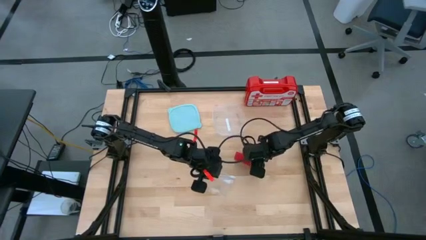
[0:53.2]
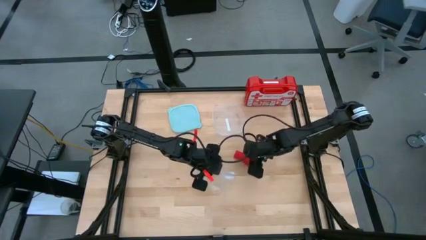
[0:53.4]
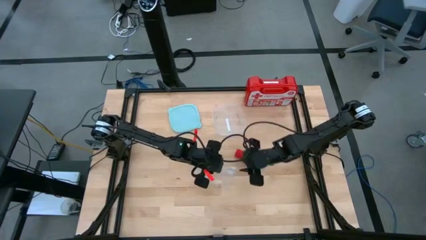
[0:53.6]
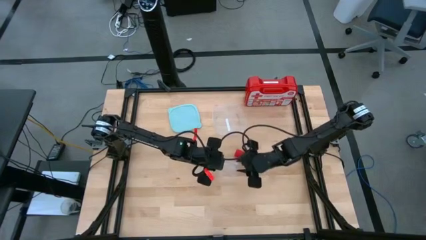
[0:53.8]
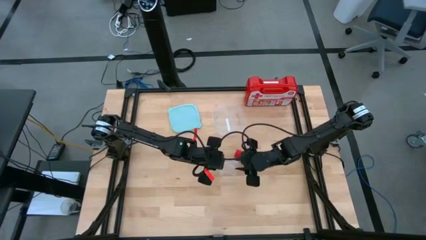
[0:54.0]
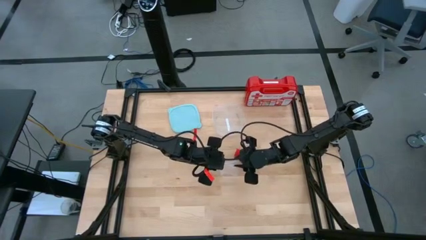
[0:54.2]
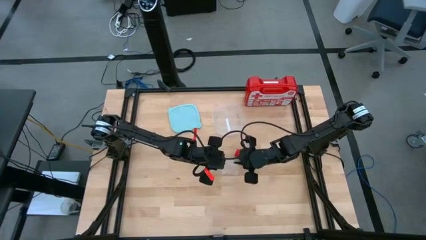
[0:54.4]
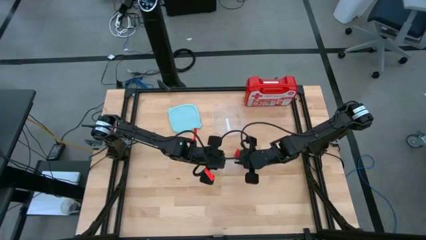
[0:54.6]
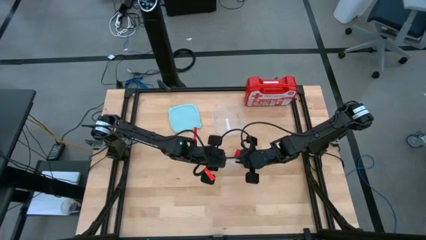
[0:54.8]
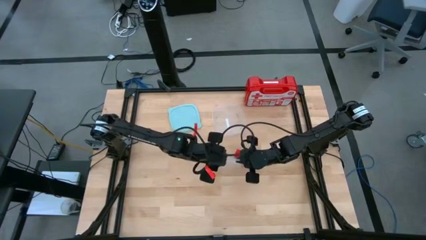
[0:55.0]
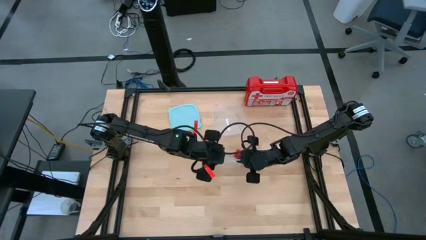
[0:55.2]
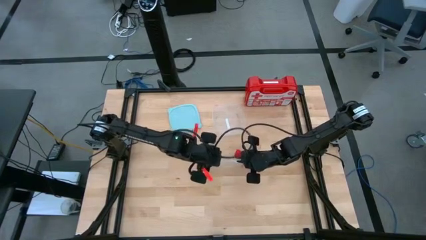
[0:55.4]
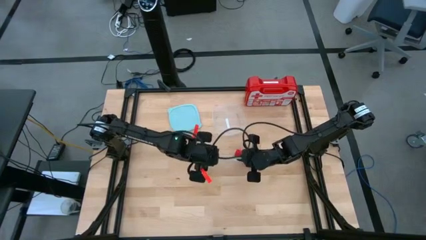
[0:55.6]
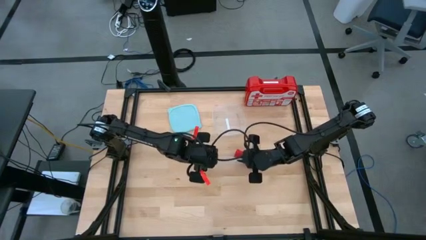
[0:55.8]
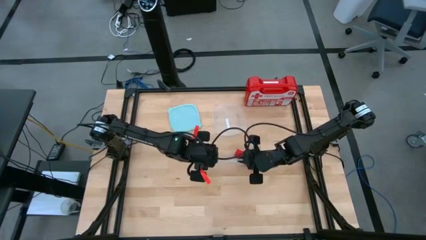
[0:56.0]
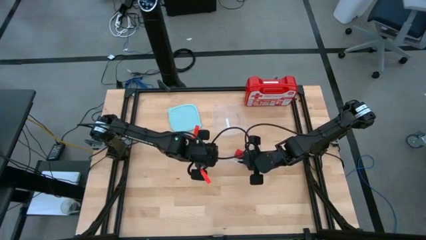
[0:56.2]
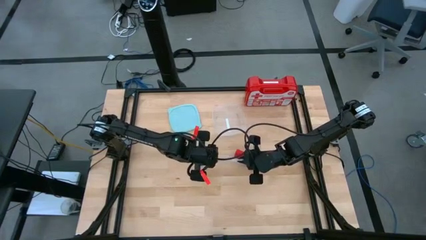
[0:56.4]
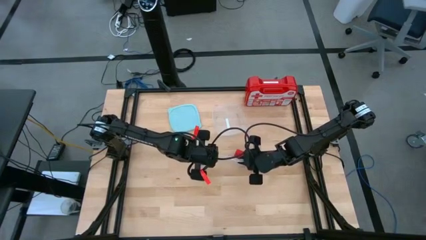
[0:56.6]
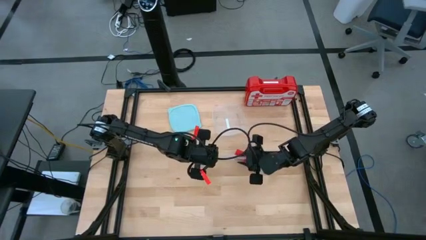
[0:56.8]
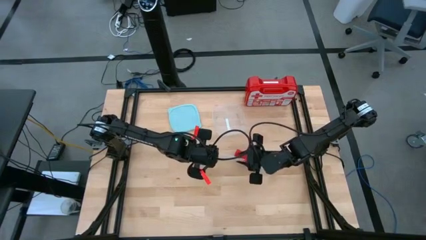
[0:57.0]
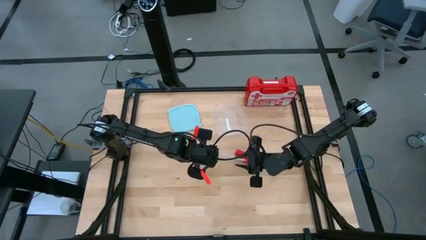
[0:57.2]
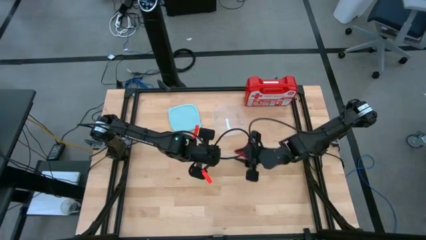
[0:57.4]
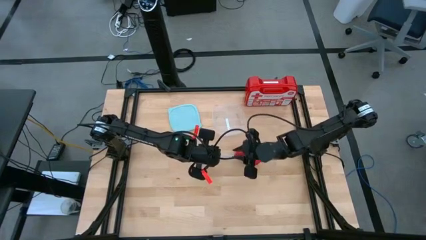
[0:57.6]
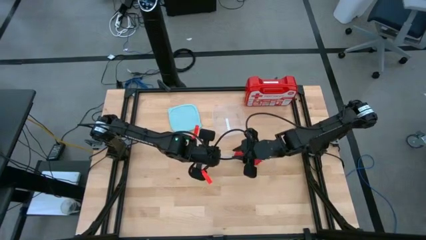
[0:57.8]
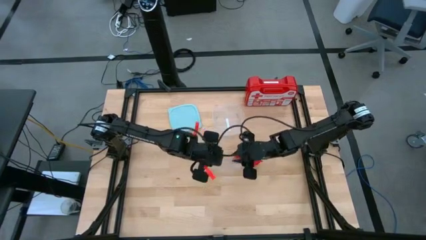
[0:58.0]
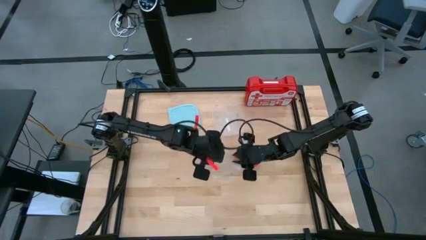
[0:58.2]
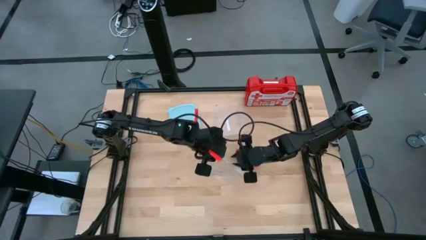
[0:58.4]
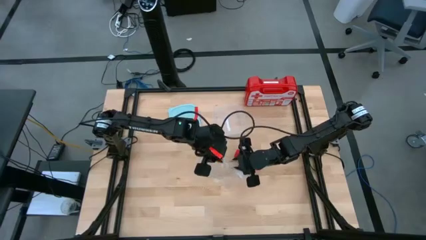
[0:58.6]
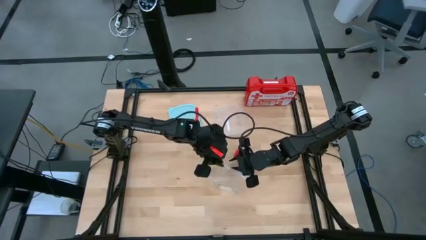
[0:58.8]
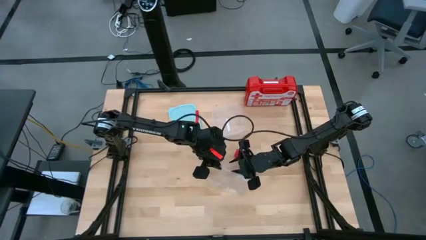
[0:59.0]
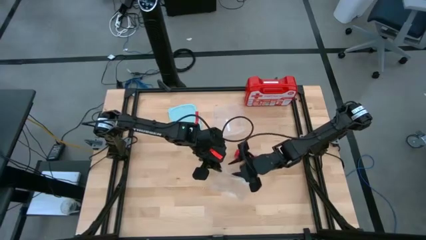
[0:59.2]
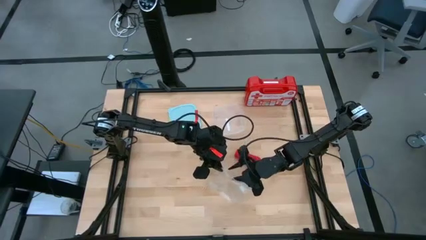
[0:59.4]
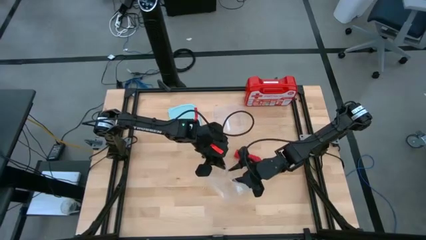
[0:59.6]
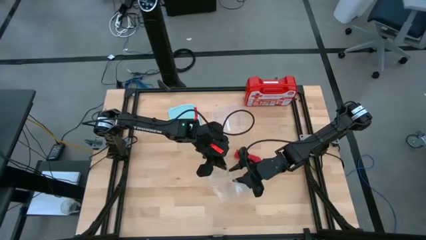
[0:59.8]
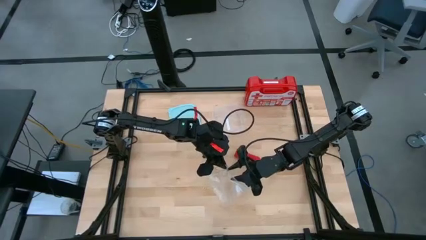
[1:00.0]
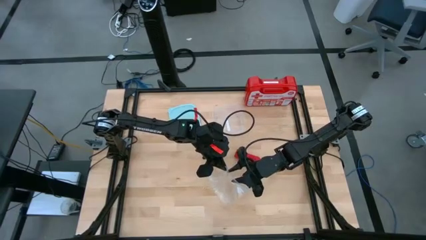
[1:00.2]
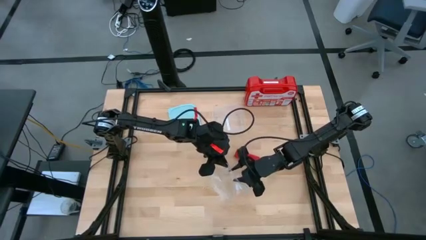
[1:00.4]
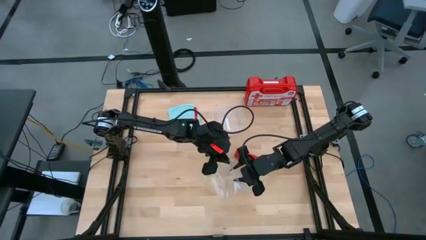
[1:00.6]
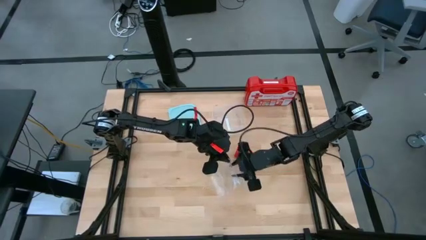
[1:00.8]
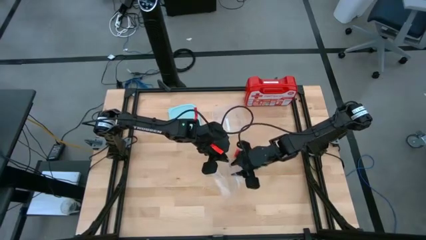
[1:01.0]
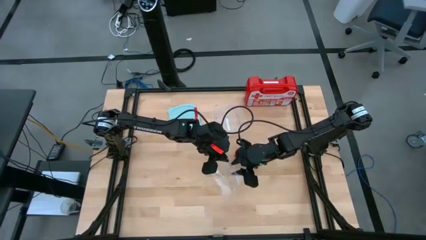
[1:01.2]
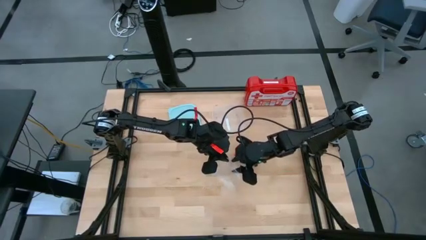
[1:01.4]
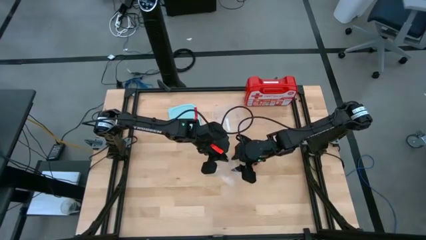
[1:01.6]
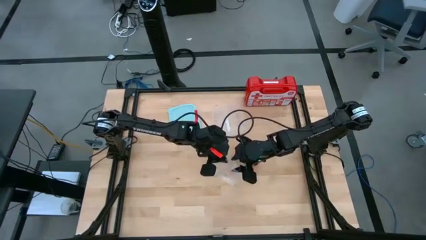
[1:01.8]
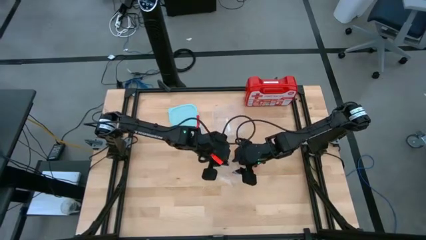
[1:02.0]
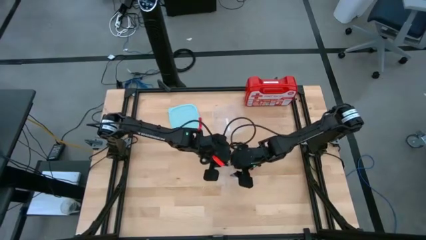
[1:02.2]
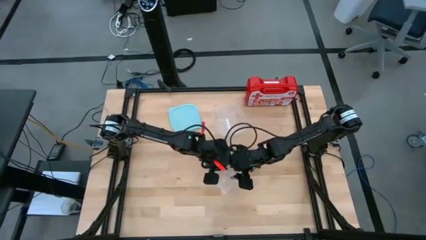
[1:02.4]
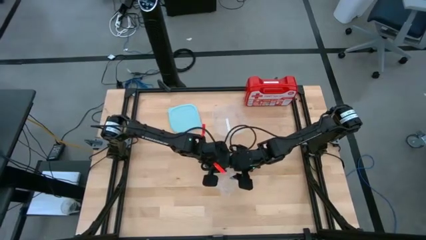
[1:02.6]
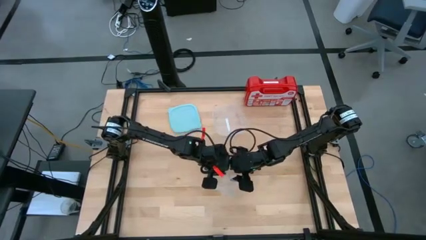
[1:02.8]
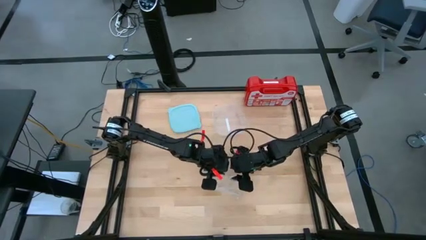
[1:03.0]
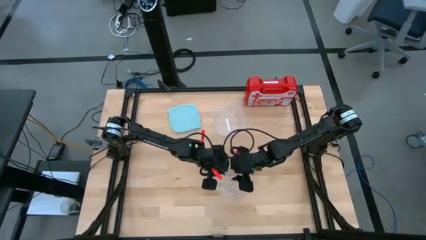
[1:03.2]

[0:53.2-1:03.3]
Task: Roll bandage
Put the rolled red bandage into the transparent zip bag

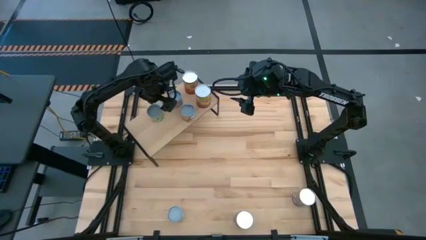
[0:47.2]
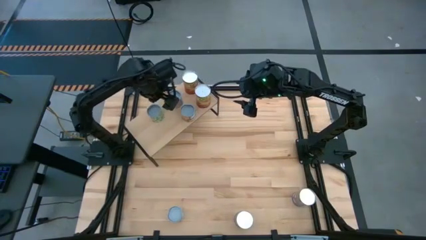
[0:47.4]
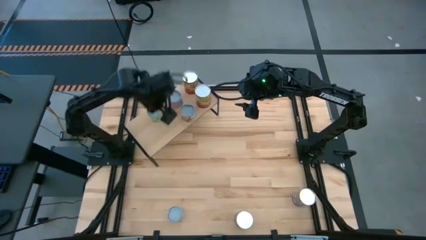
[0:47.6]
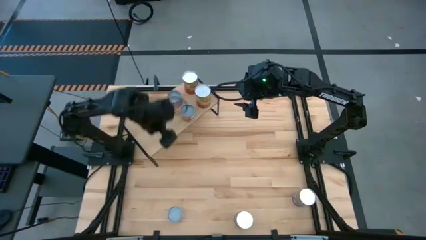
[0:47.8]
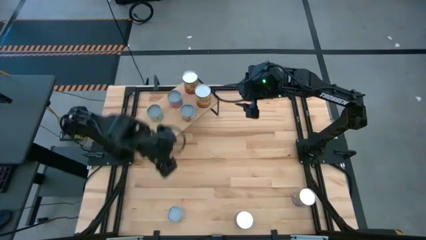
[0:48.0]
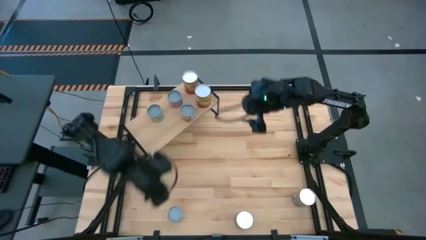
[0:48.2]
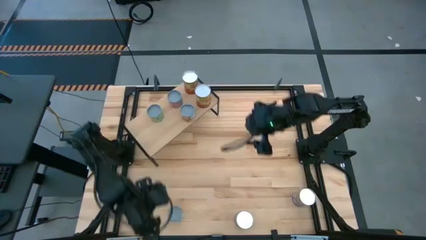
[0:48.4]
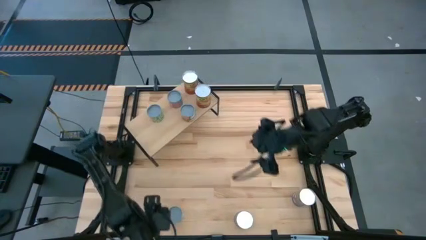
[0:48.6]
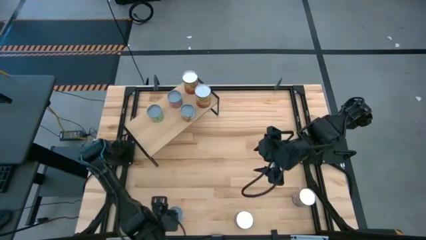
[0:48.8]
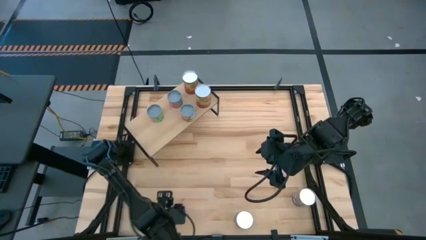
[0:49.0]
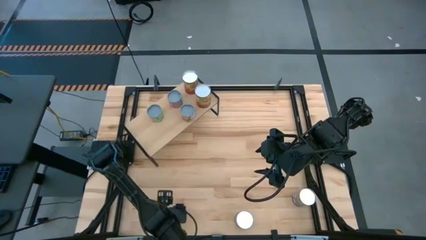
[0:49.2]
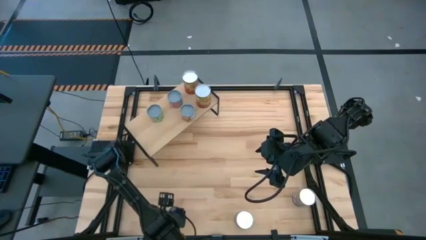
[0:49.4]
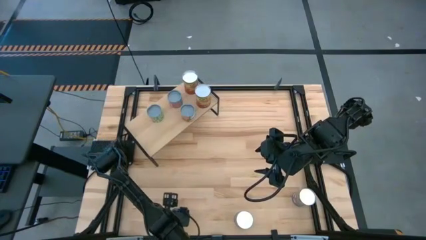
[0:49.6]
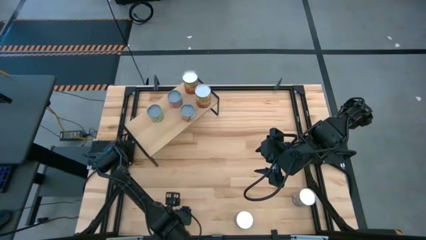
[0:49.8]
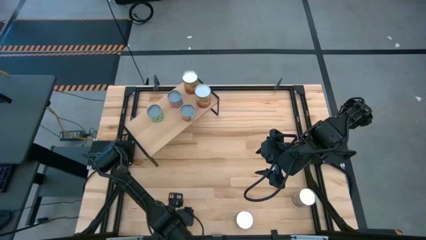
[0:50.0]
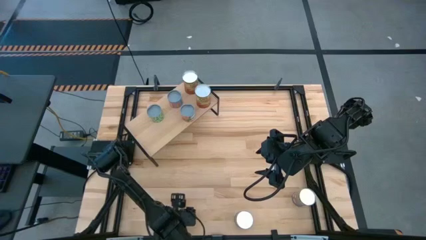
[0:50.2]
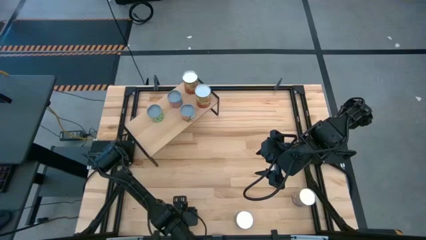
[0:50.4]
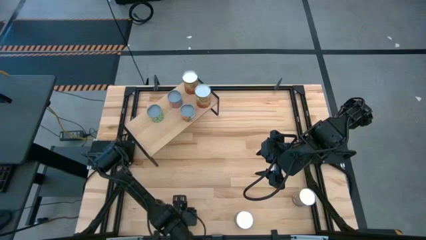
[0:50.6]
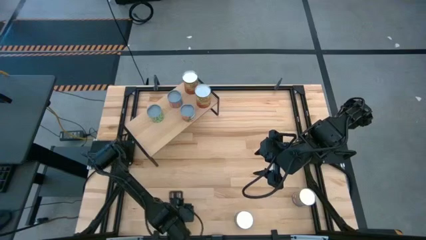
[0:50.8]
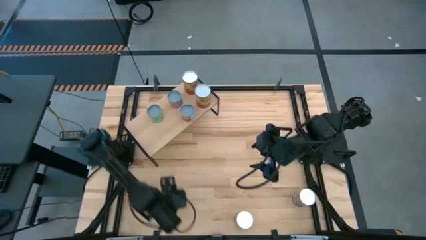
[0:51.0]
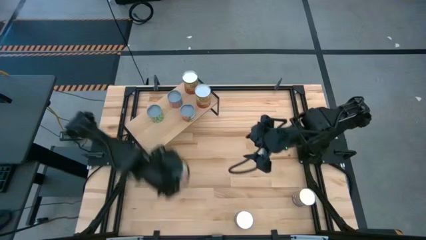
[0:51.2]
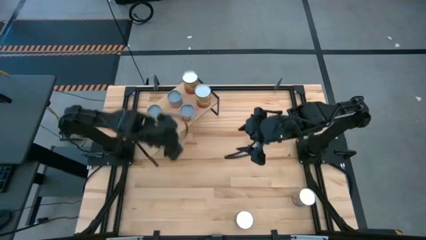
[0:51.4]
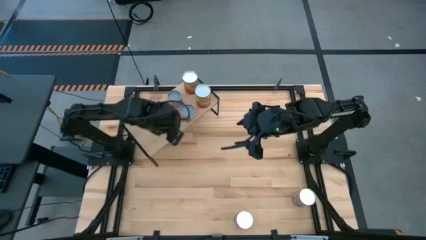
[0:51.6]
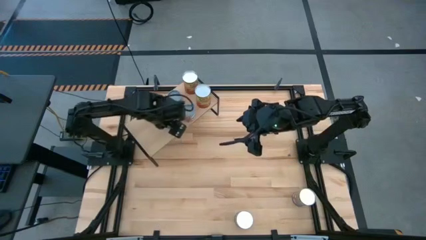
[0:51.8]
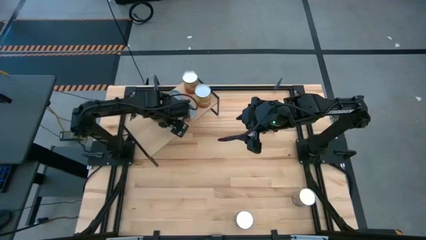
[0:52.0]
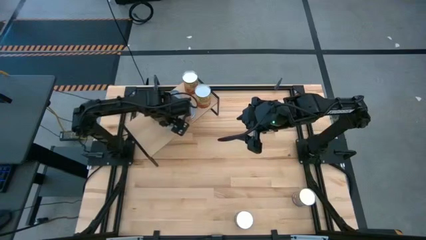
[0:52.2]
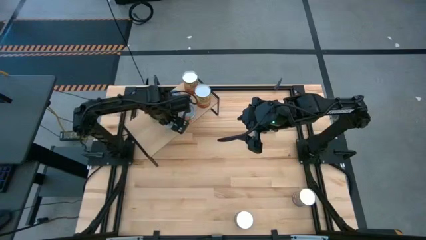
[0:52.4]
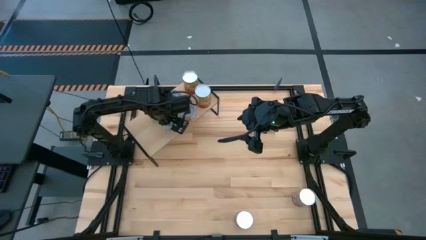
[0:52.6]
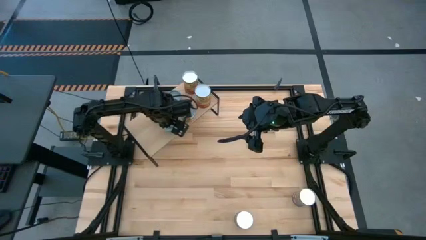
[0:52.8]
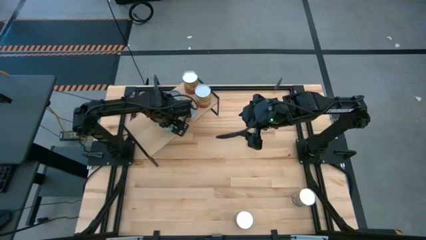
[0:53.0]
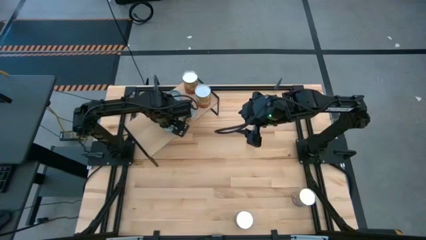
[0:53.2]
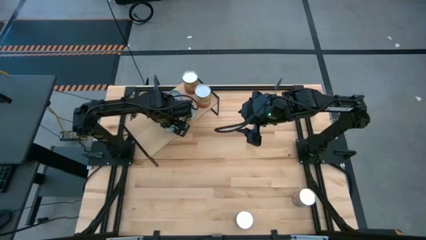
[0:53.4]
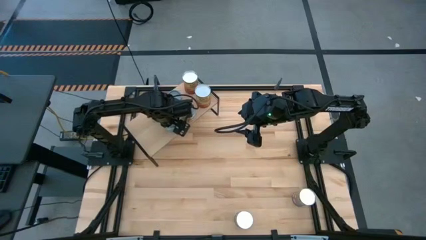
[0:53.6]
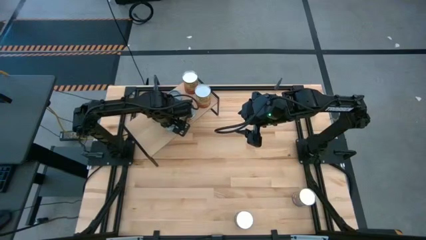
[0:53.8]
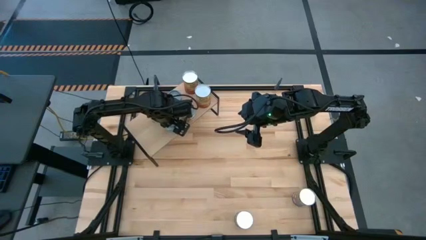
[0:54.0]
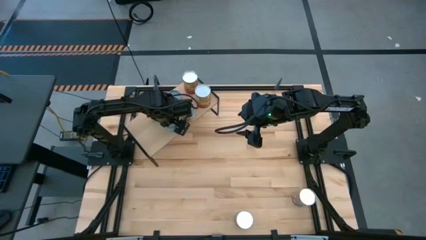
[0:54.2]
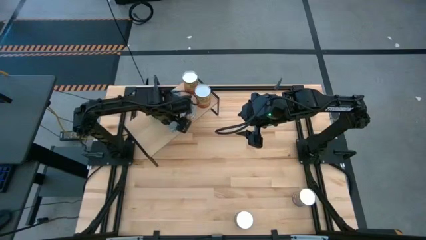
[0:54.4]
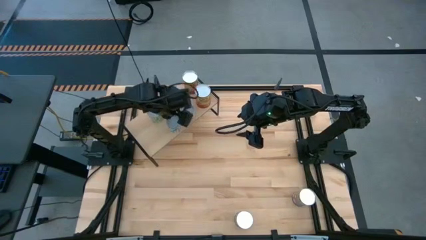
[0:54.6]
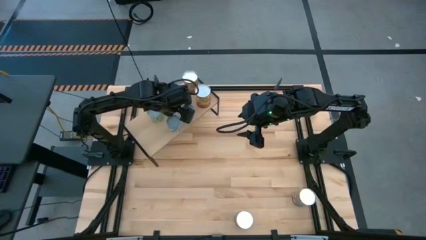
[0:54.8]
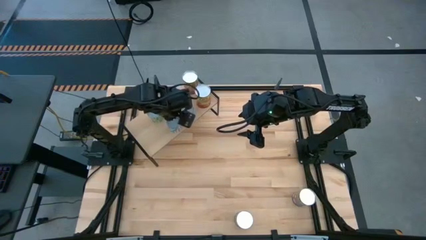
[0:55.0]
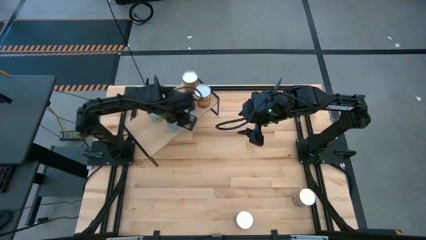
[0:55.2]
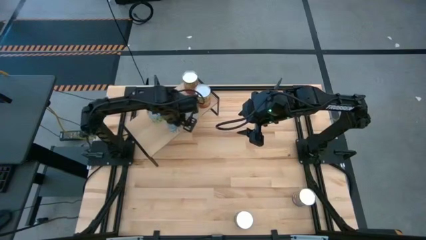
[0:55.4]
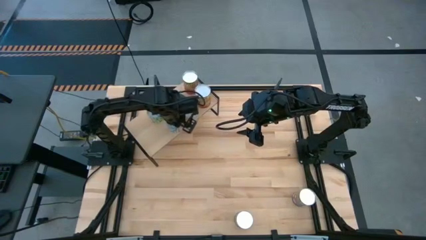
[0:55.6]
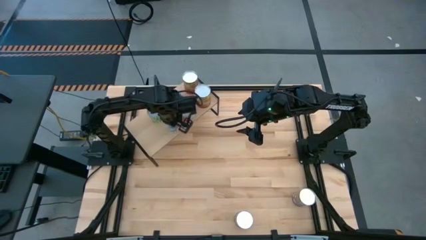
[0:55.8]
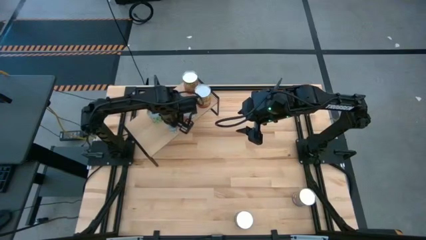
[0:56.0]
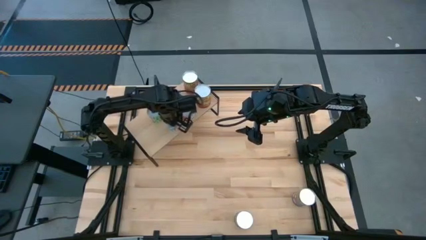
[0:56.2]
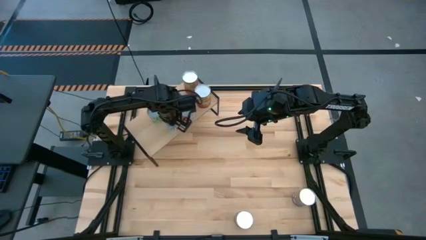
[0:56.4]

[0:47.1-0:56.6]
Task: Pick and place cans onto a shelf
Put the canned carrots on the shelf
